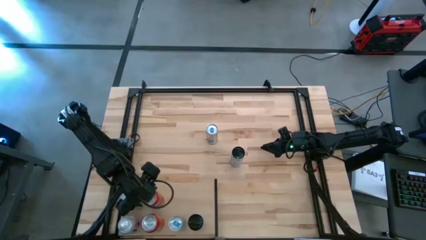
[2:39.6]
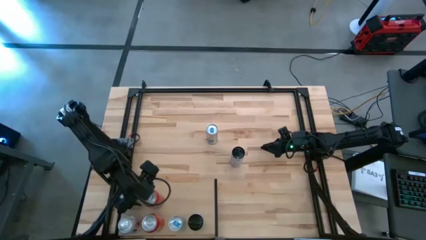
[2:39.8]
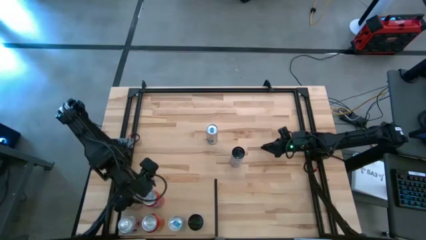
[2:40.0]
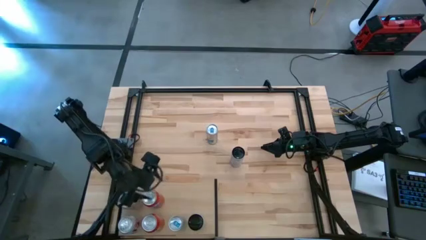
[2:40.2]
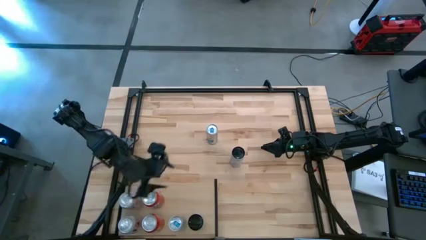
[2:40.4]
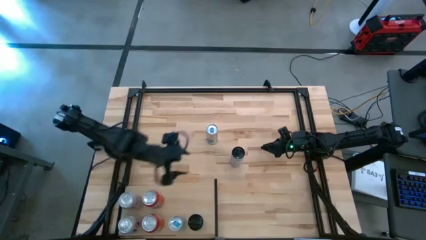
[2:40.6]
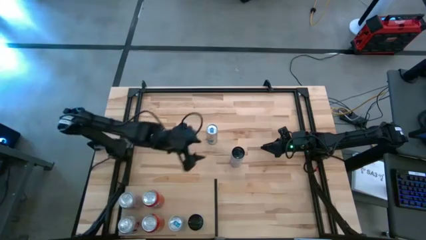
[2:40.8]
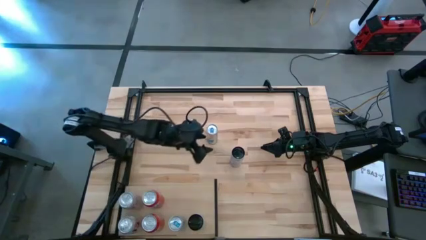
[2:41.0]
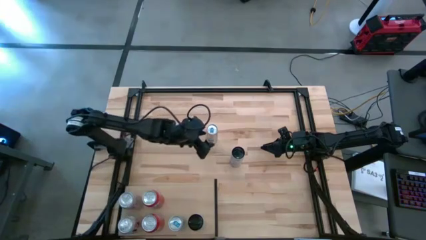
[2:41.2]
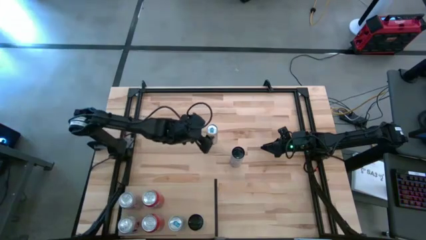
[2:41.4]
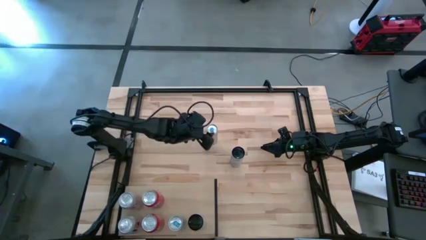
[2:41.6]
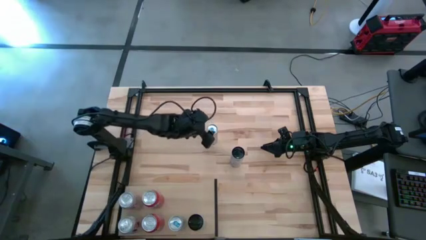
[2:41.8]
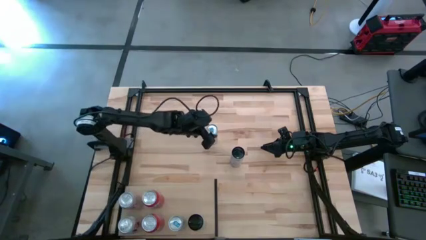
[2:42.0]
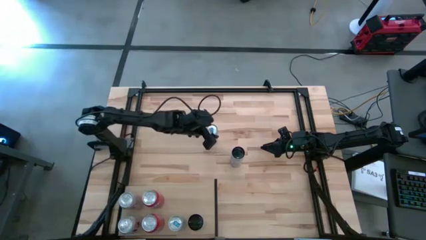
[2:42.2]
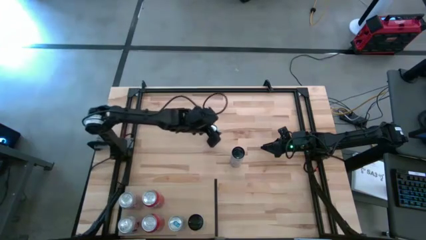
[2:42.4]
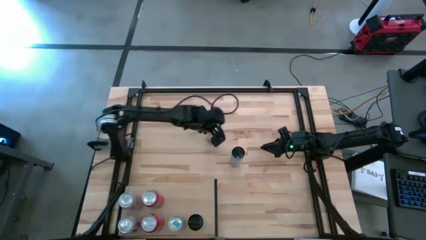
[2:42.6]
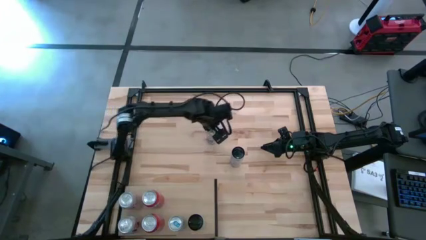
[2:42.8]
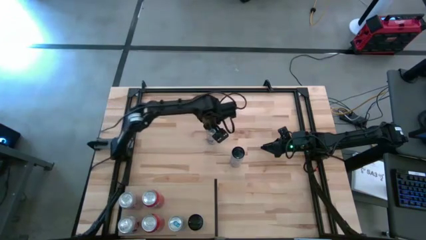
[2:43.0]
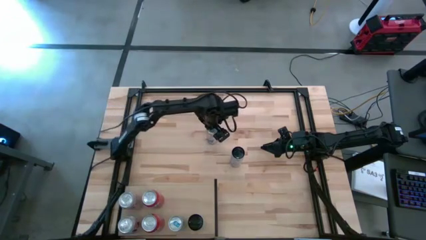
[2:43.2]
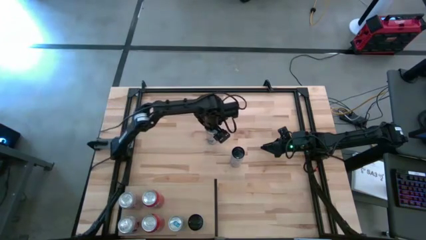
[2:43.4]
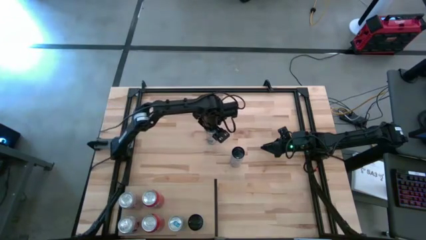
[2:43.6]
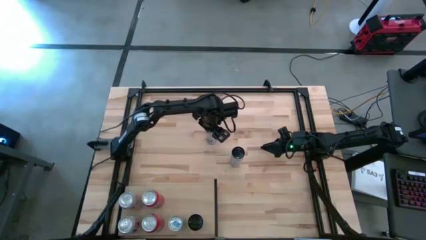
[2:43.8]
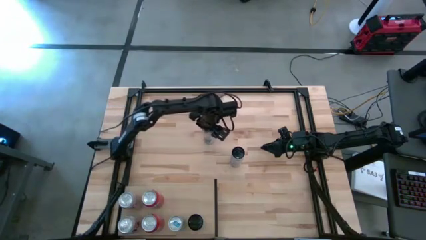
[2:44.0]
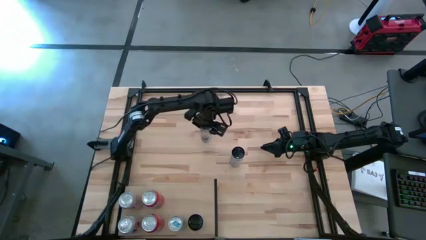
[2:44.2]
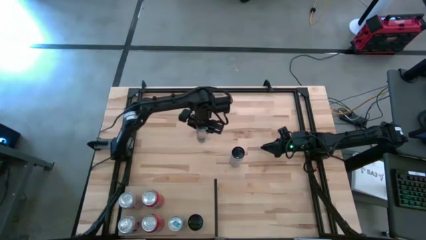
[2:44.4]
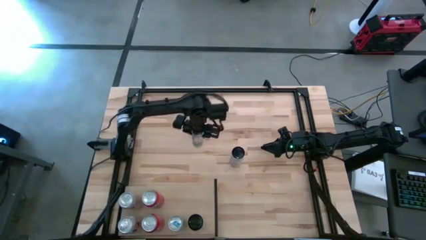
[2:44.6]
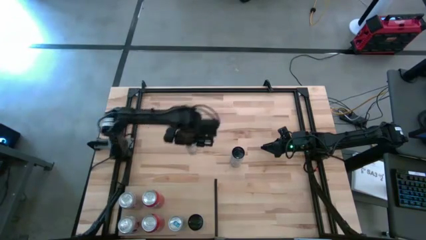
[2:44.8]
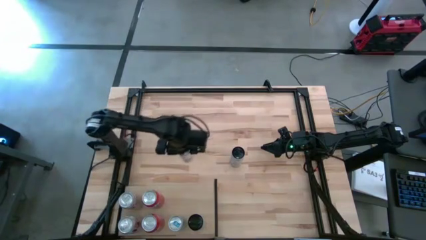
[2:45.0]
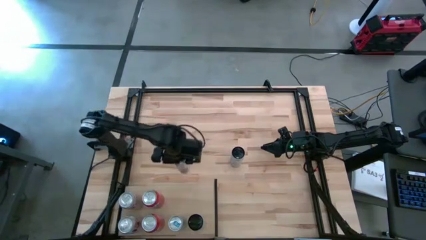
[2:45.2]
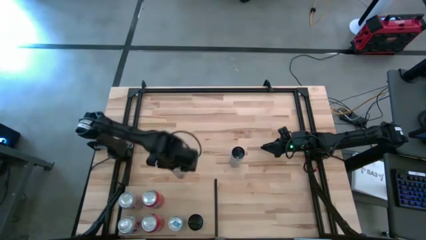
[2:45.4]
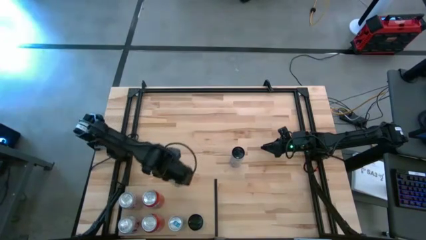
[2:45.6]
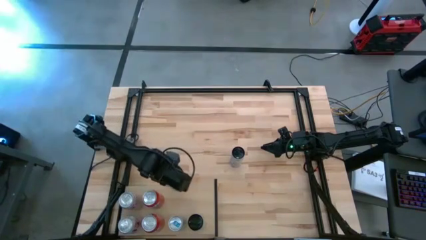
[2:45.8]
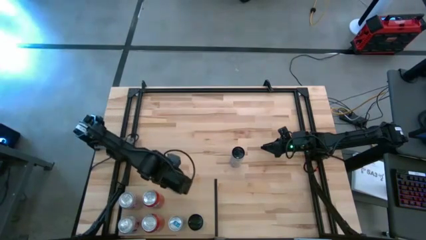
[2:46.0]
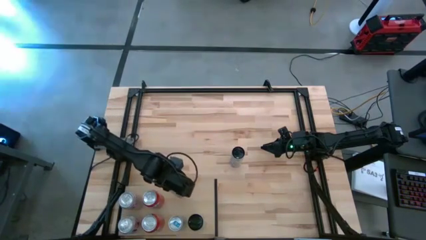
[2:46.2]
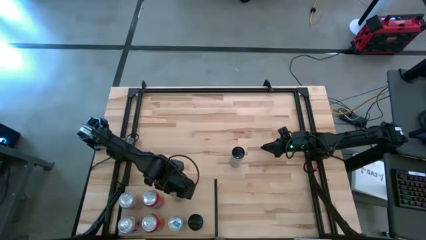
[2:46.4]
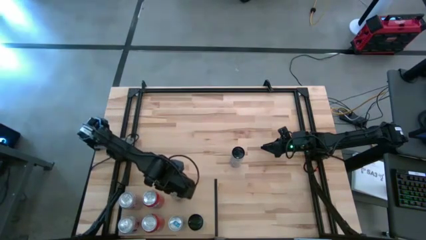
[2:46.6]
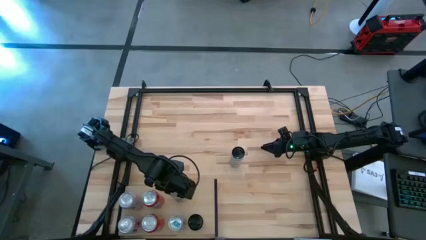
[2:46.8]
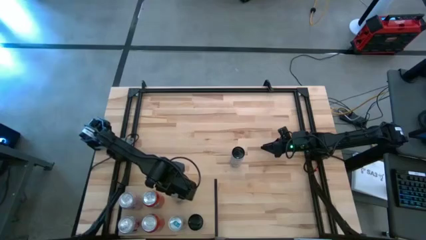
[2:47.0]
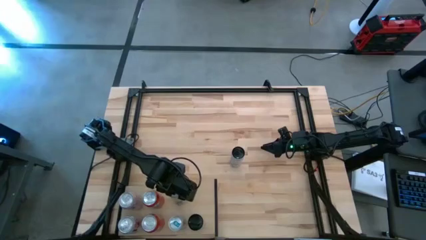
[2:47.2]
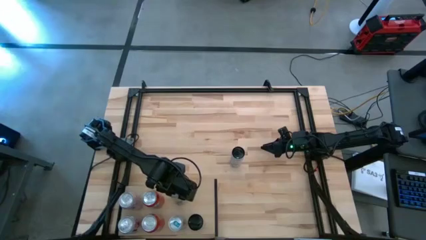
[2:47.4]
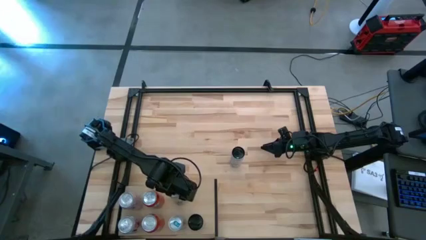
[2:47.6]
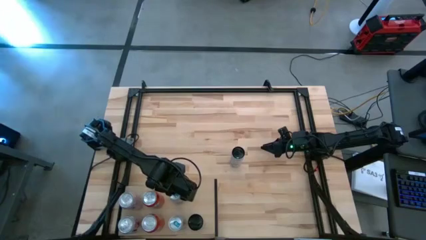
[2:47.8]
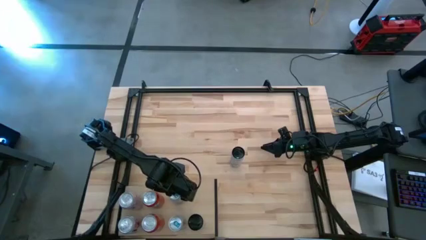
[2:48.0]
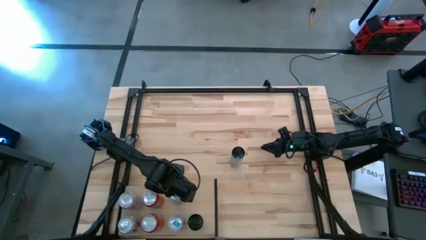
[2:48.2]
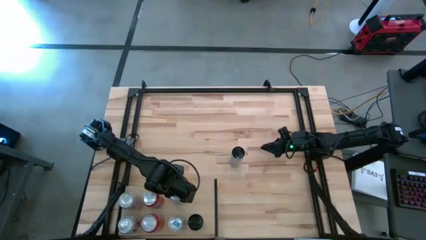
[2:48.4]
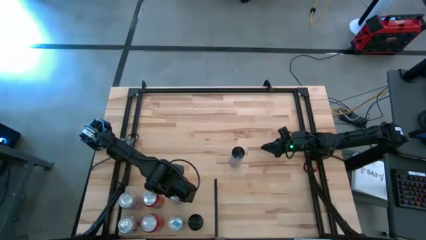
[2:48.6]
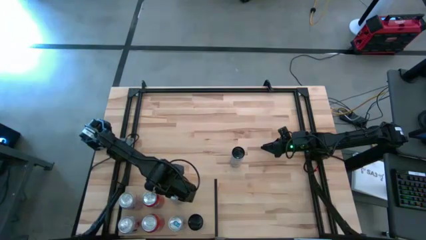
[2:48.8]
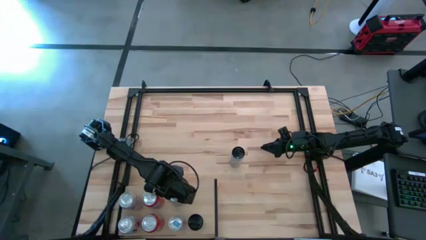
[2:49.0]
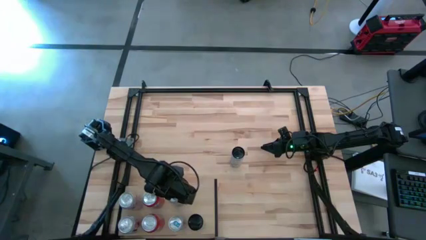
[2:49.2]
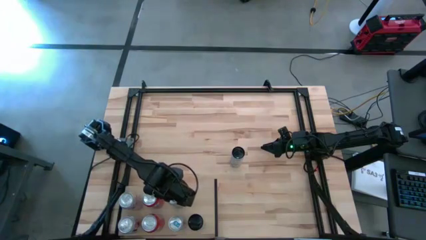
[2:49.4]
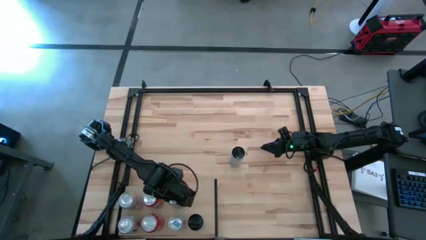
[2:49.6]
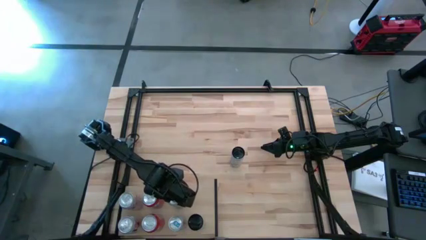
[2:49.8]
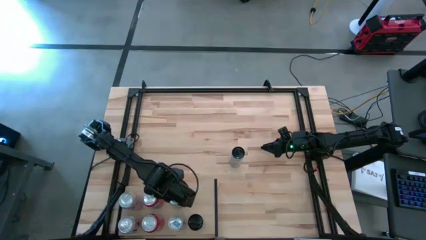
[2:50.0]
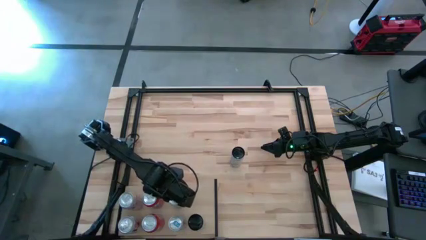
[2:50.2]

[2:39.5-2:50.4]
Task: Place canned beverage on shelf
Put the blue soda can on the shelf aligned with the other blue soda can

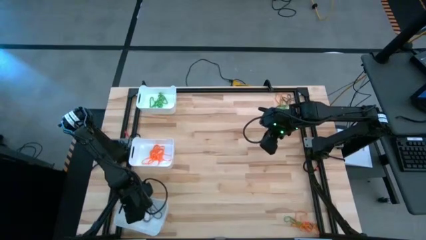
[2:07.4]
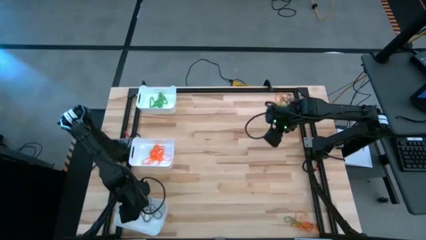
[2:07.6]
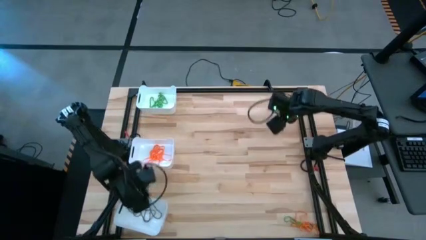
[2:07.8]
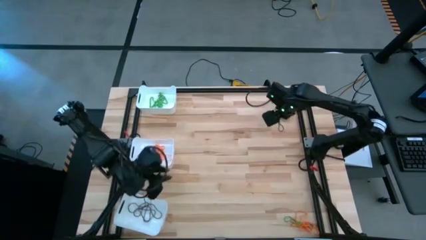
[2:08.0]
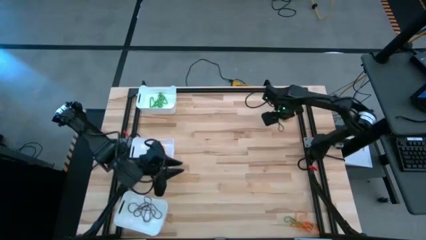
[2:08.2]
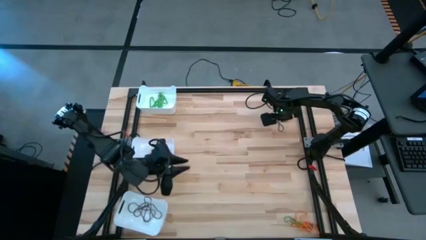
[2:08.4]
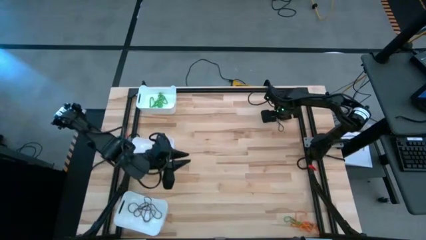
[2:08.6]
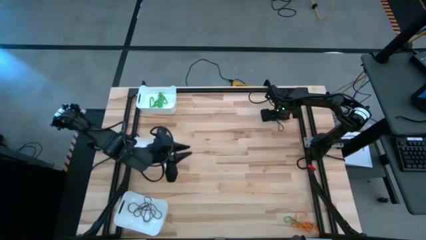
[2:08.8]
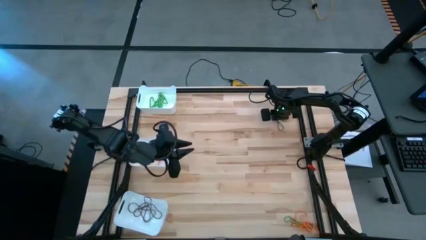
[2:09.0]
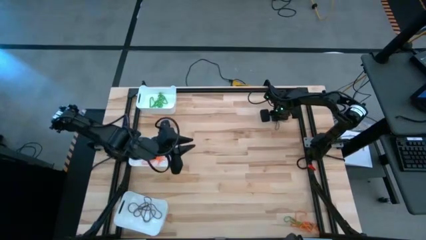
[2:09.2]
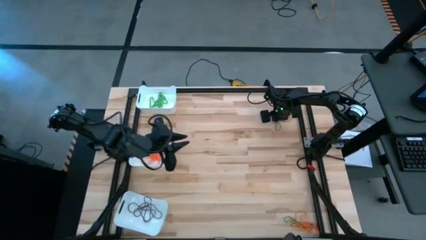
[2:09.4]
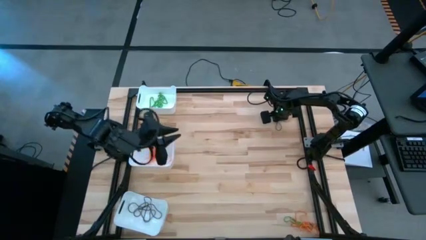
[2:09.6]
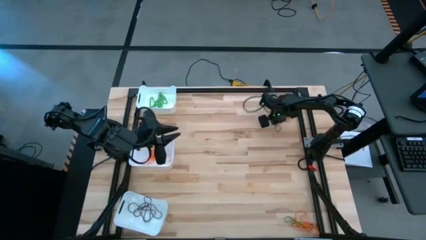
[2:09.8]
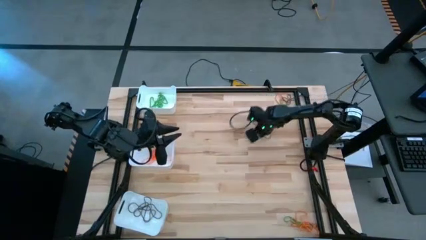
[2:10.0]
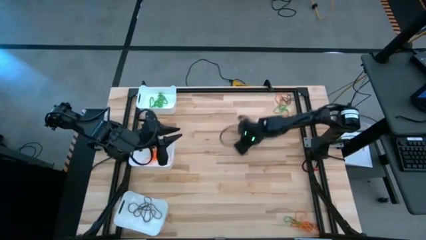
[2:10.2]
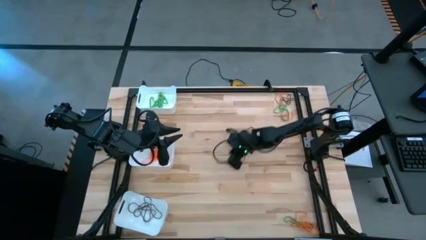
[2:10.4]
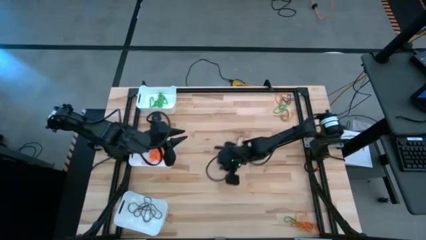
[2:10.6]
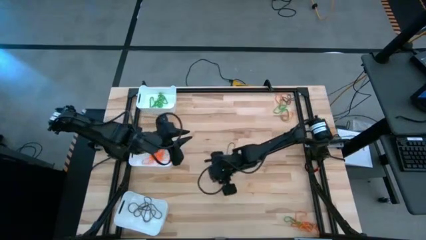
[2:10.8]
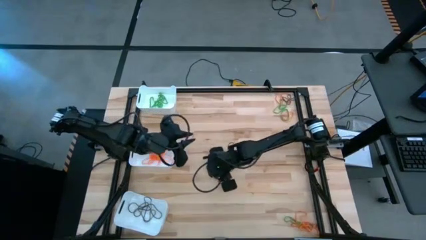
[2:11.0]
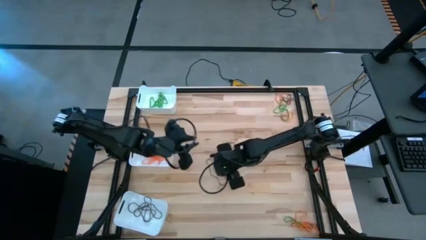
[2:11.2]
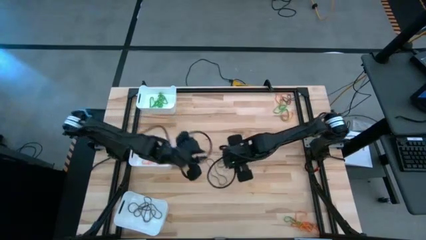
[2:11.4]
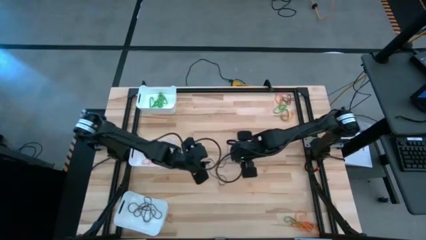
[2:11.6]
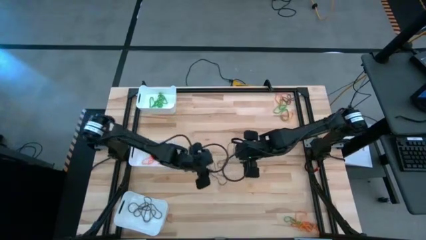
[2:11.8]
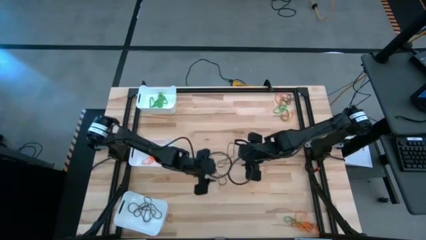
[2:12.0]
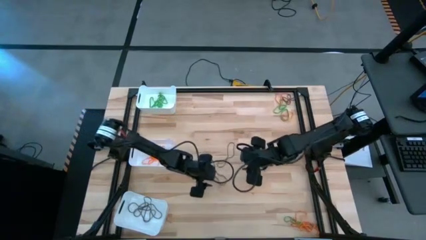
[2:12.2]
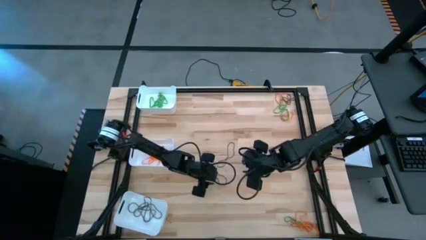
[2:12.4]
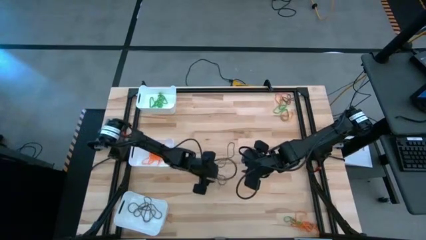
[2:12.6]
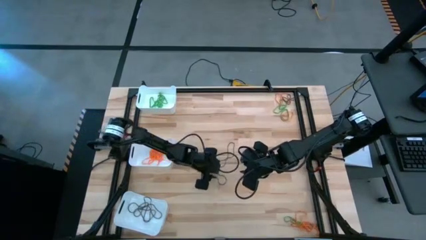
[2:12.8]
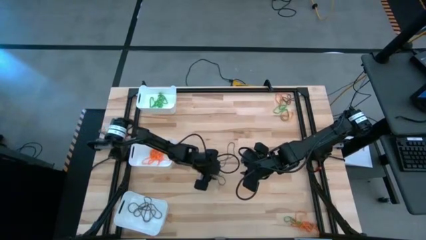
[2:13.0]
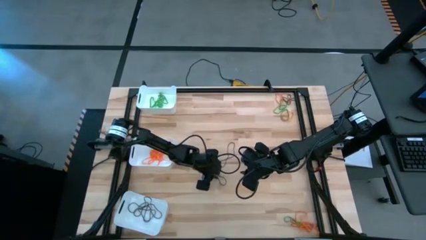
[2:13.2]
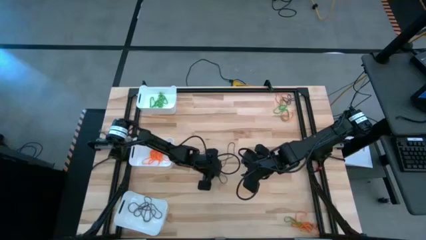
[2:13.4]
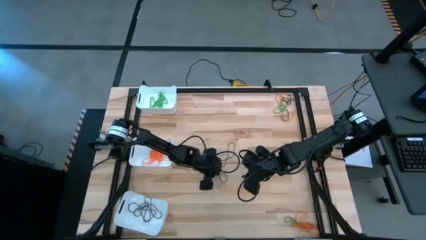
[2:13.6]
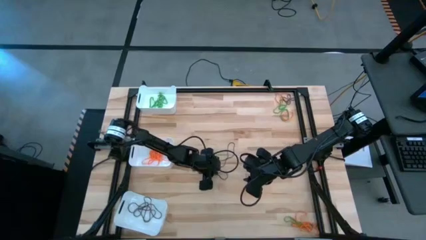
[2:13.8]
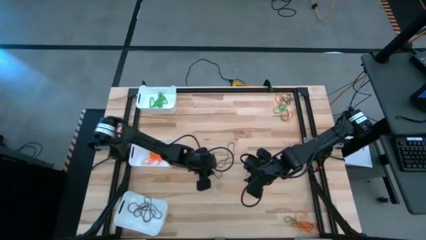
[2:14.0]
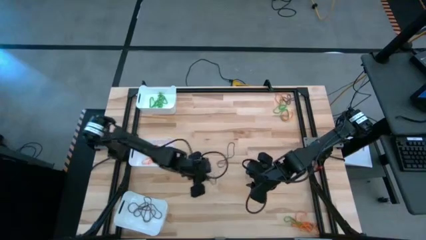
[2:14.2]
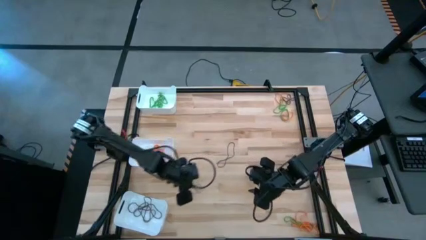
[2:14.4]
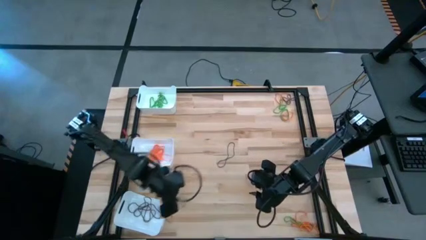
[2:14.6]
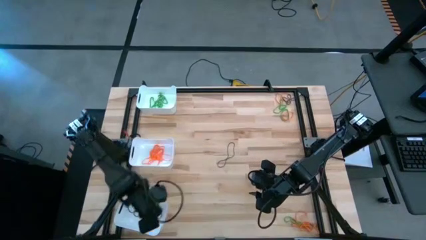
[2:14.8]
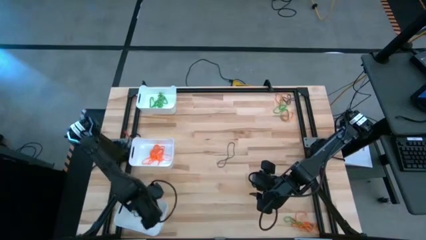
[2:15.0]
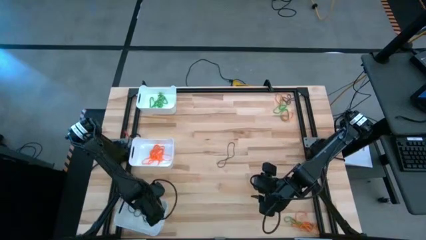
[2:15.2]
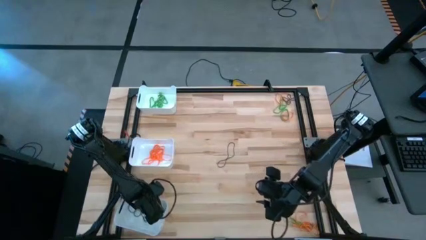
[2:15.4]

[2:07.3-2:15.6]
Task: Sort rubber bands into baskets
Put the black rubber band into the bottom white bin
